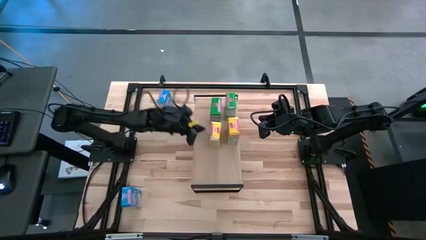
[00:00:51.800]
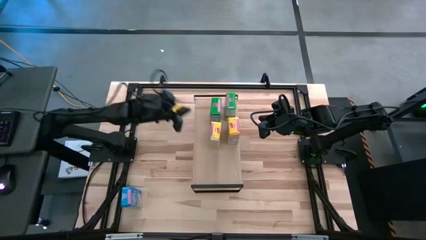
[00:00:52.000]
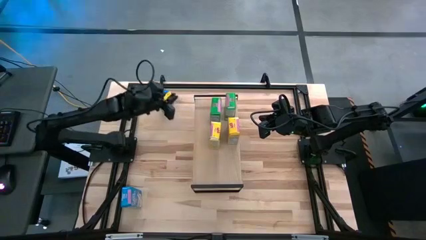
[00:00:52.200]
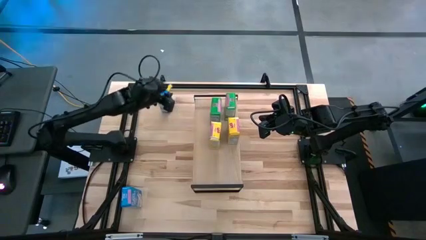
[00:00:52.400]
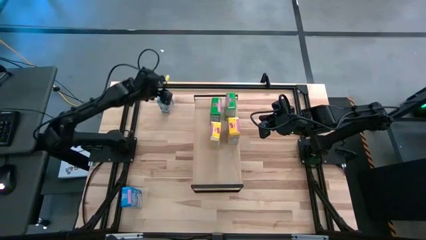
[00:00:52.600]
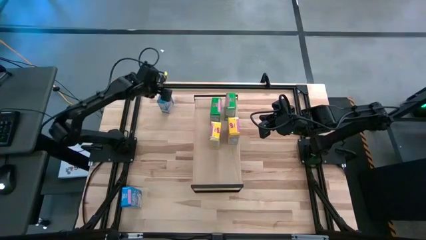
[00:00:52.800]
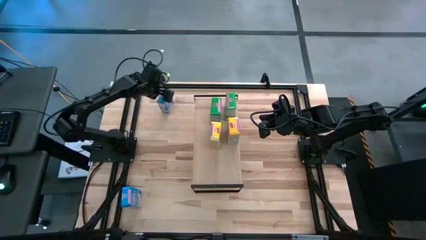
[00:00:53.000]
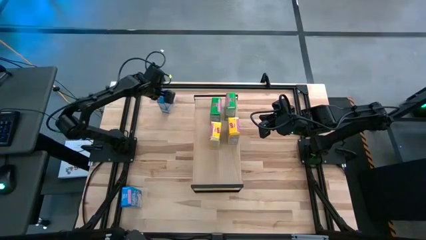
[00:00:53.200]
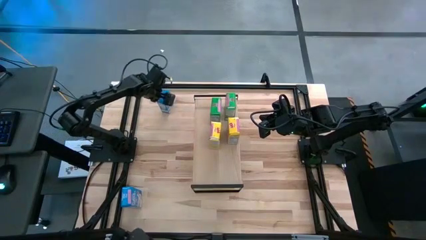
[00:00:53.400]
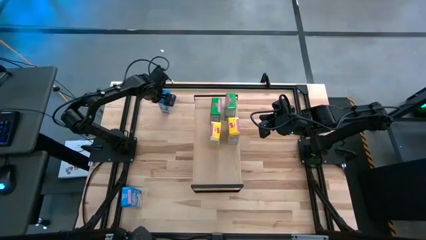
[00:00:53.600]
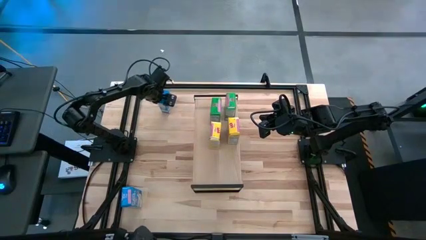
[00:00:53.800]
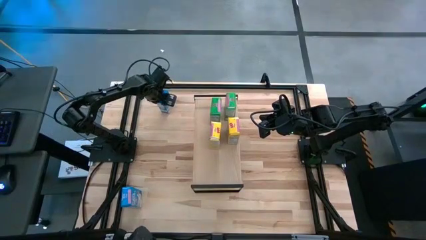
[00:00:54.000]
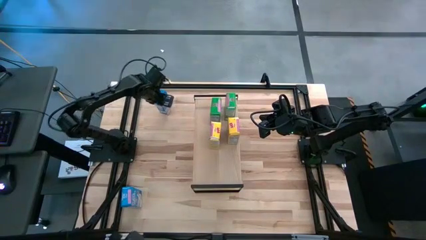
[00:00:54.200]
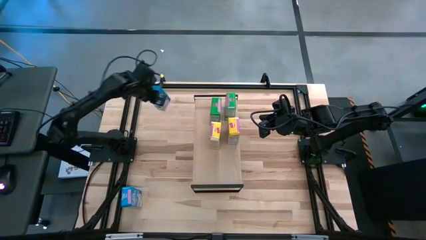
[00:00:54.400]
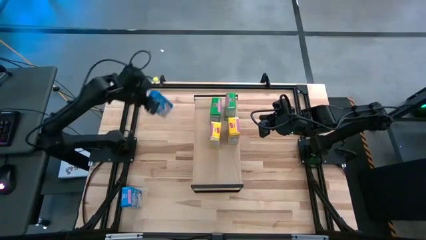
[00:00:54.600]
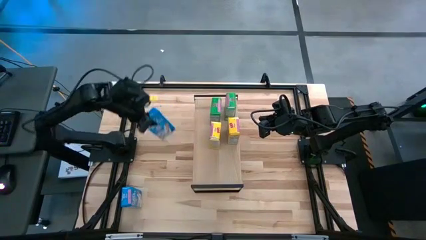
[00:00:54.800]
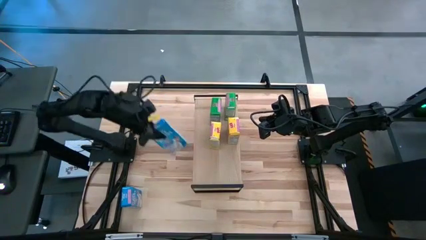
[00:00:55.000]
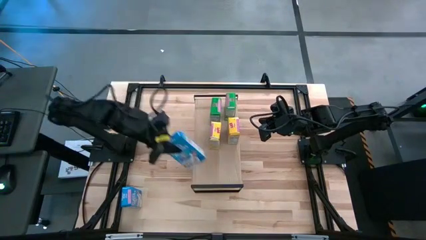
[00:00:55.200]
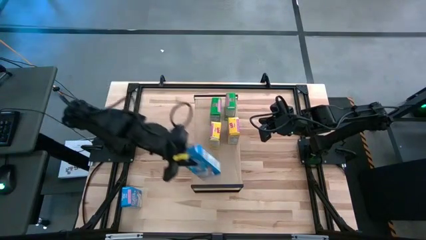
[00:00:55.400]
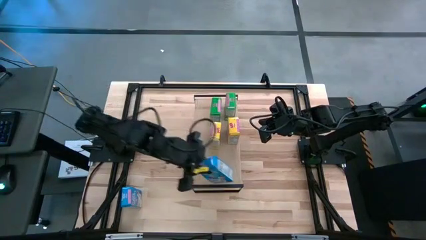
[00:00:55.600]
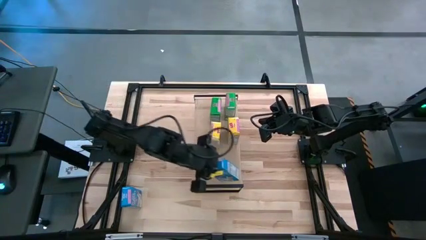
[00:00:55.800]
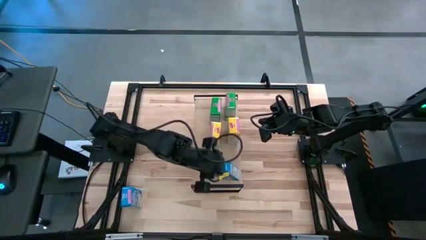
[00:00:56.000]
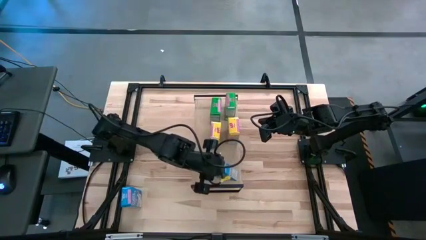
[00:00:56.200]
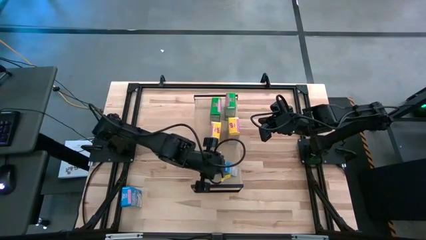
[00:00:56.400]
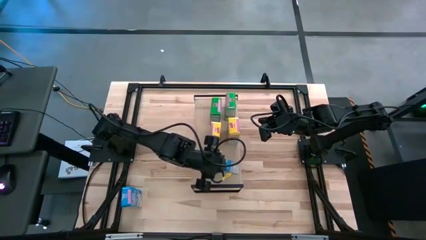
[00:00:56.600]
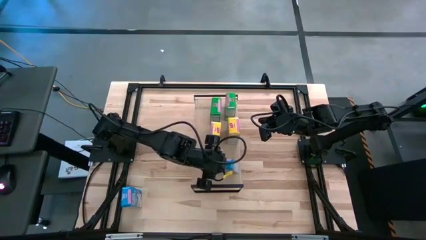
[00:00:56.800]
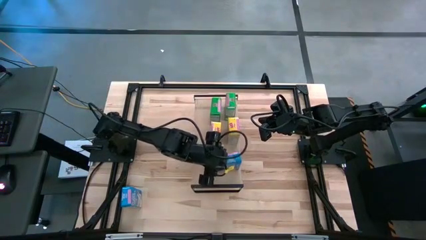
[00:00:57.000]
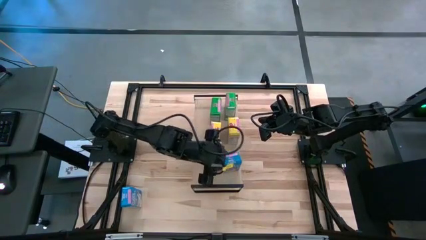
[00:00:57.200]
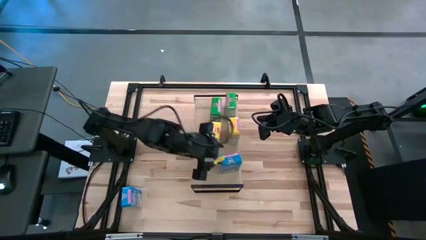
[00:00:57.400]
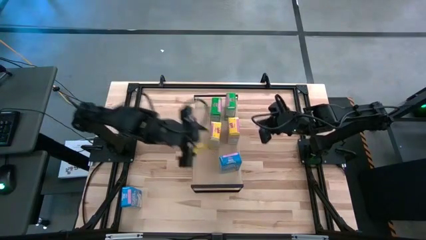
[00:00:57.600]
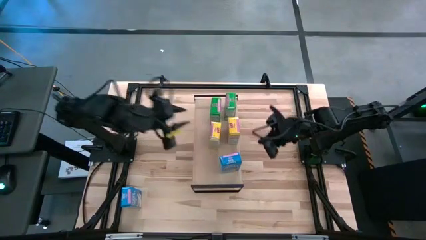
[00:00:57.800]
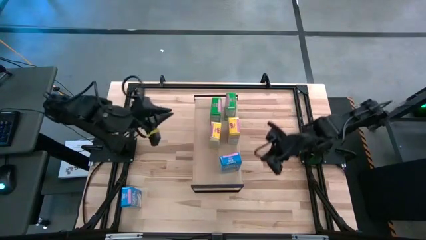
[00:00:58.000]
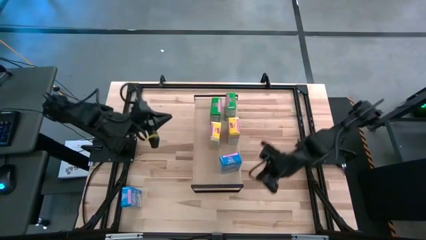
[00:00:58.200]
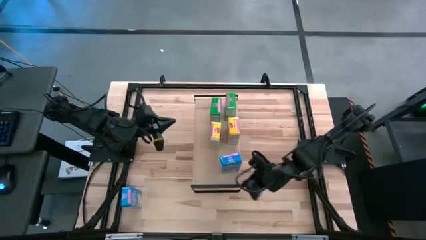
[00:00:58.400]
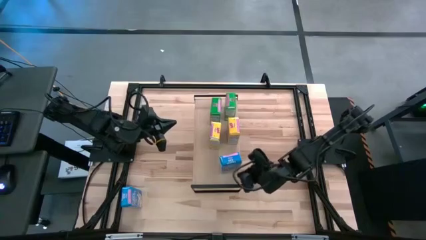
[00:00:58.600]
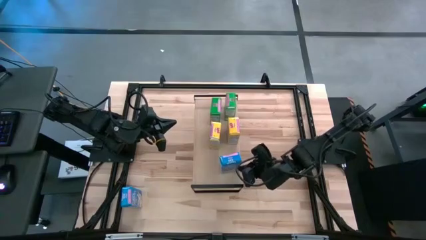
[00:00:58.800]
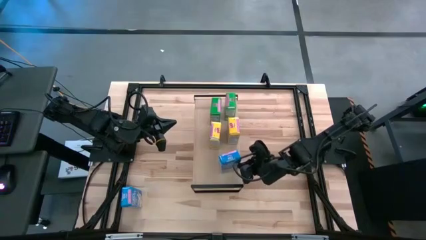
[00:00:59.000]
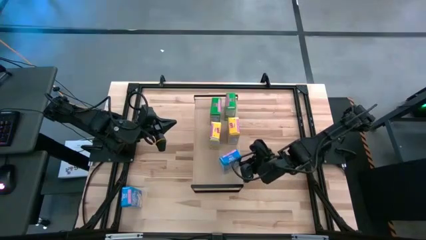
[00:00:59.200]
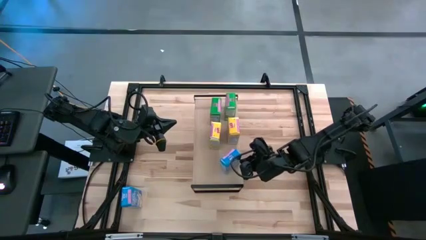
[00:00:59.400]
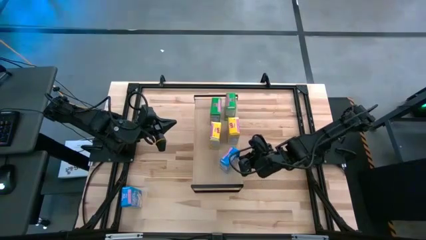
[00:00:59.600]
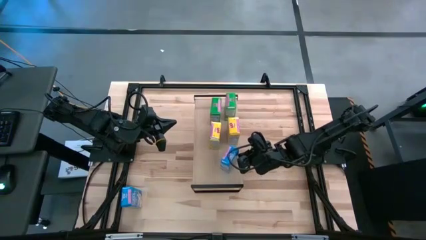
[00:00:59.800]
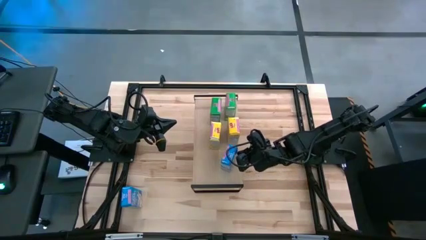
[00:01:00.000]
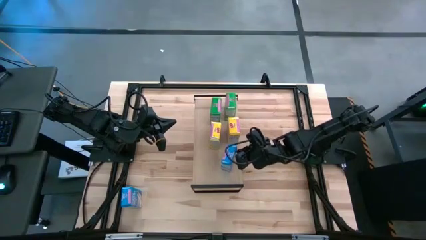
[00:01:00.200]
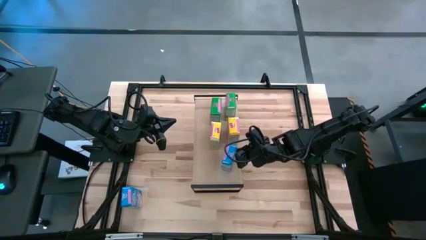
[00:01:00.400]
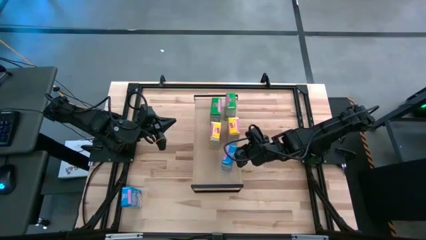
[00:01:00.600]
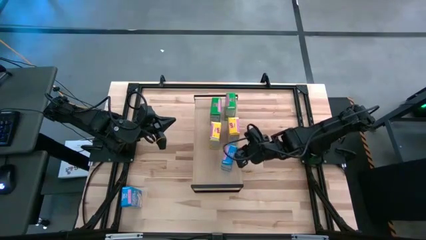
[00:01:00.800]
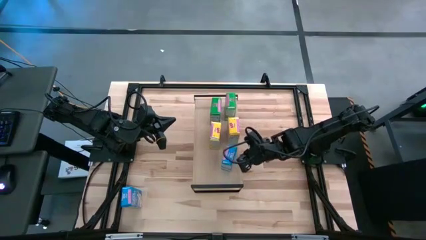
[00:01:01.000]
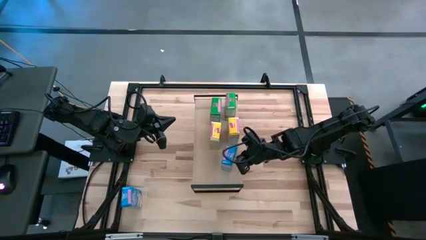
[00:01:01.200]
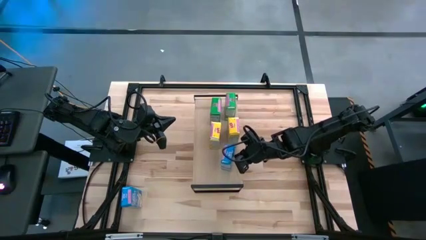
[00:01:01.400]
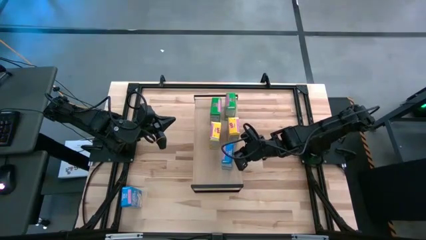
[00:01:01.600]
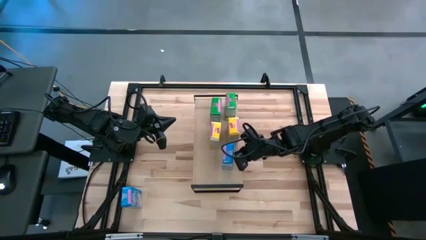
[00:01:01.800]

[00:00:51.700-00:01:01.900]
Task: Stack cereal on shelf
Put the top blue cereal box on the shelf

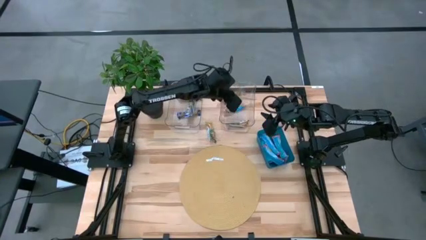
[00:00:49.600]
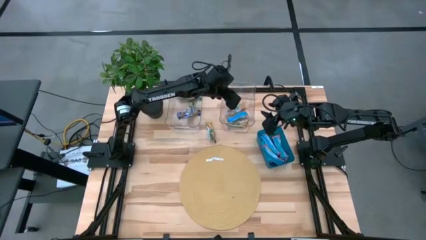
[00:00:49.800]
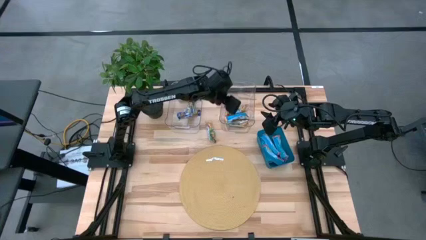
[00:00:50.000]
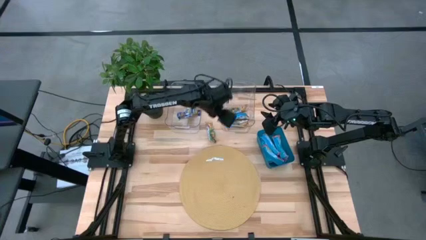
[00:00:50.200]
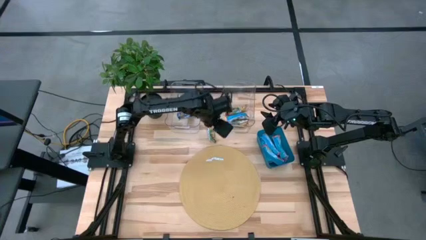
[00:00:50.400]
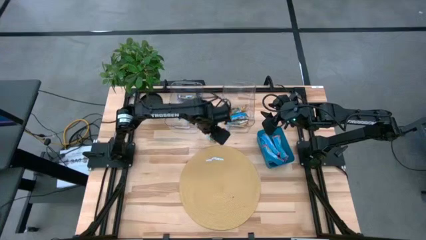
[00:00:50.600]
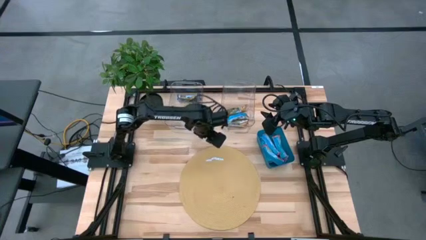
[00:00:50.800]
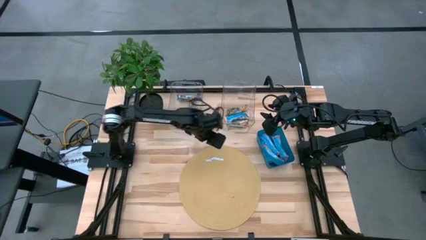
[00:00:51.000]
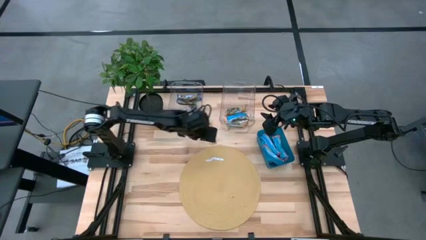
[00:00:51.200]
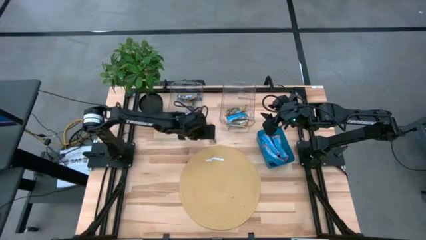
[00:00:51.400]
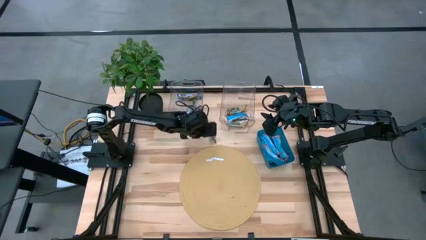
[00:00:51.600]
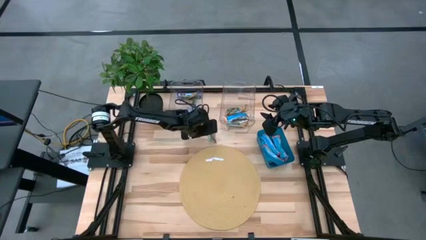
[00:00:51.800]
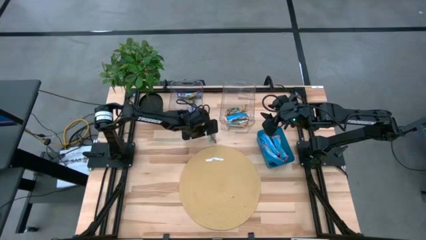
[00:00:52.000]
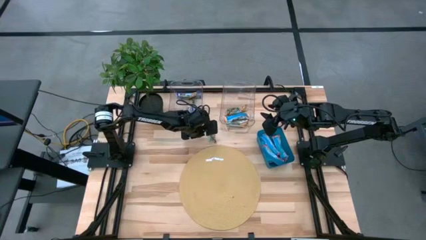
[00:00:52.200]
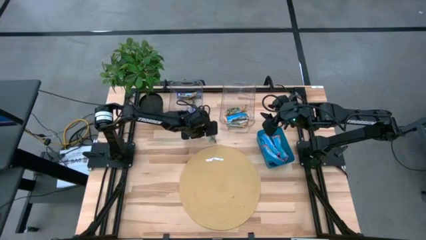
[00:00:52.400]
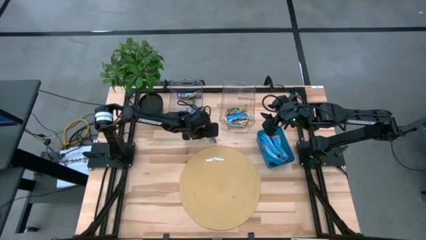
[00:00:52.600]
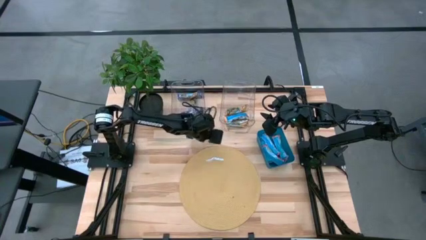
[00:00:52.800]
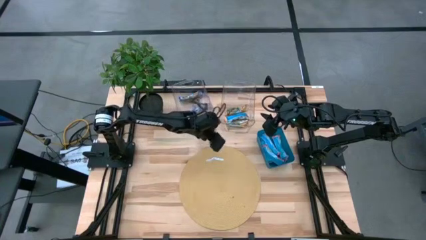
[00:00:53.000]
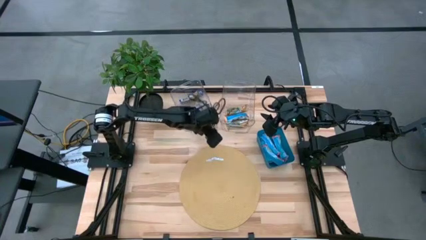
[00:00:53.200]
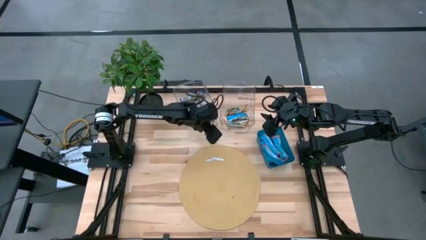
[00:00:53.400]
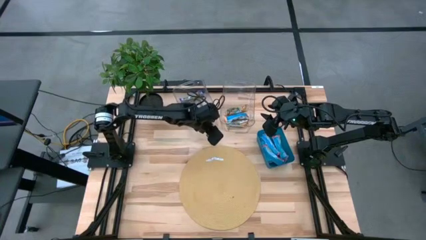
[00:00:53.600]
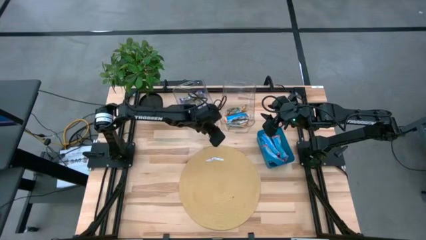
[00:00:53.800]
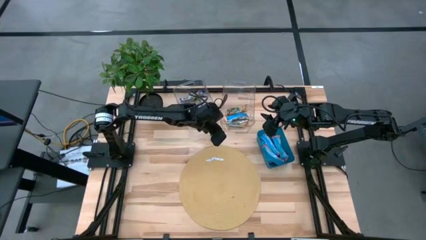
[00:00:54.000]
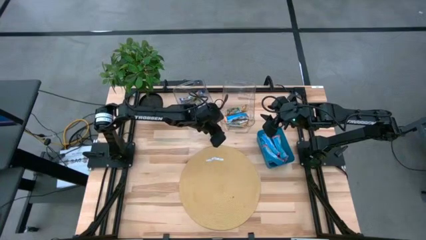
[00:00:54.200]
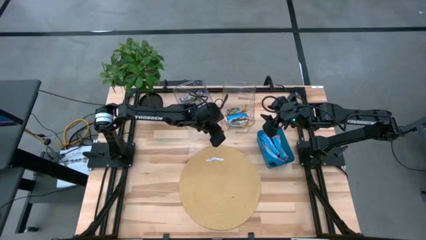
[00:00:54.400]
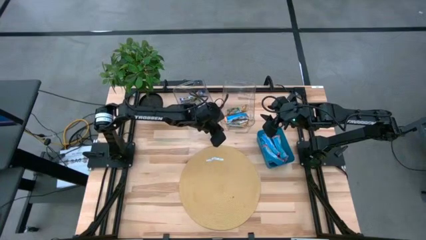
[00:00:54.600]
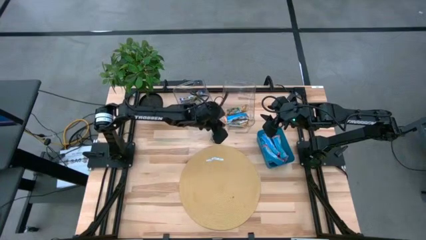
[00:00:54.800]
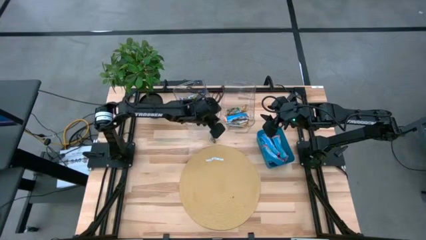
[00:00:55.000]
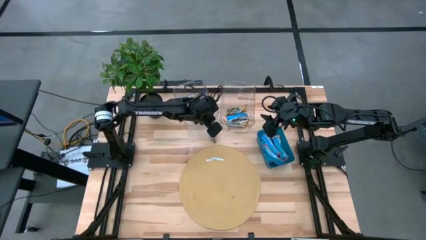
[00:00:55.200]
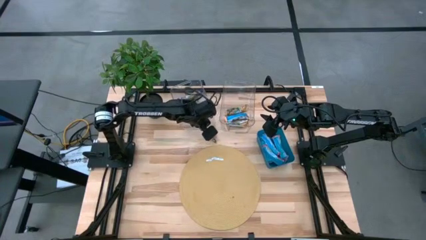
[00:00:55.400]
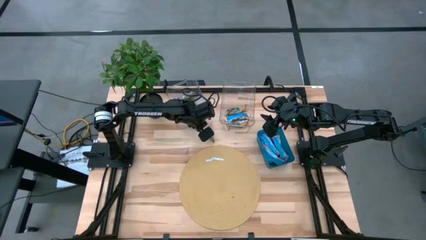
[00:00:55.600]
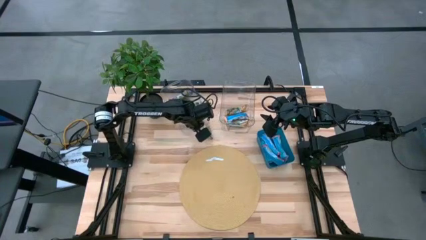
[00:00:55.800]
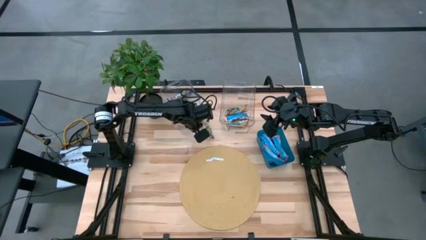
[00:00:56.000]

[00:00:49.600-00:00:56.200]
Task: Pick and place Granola Bars by type
Adjust the left transparent bin
